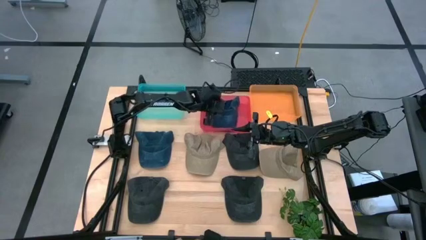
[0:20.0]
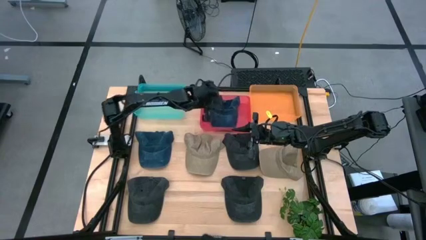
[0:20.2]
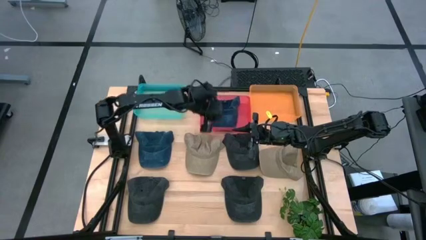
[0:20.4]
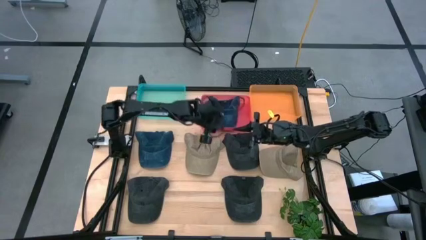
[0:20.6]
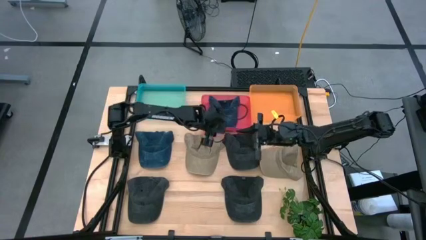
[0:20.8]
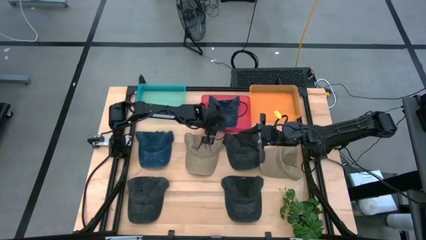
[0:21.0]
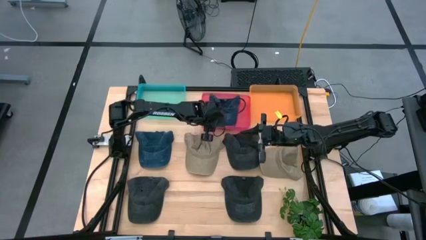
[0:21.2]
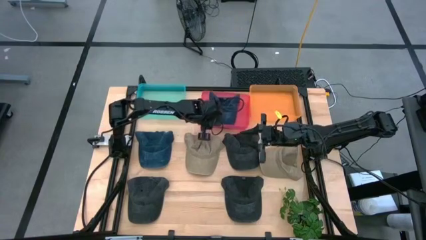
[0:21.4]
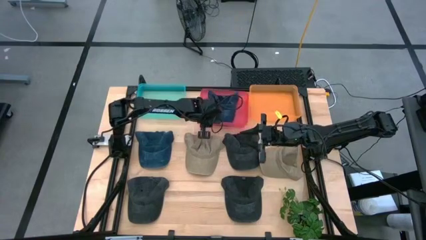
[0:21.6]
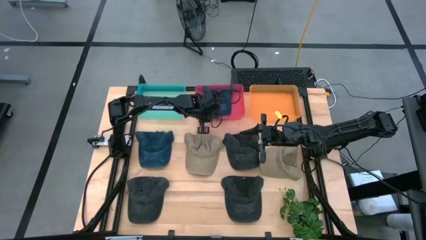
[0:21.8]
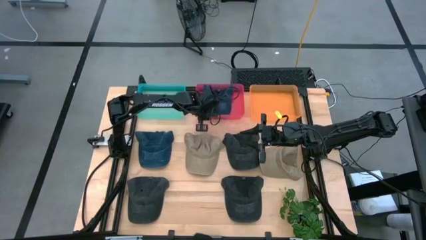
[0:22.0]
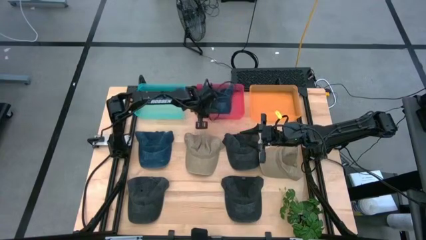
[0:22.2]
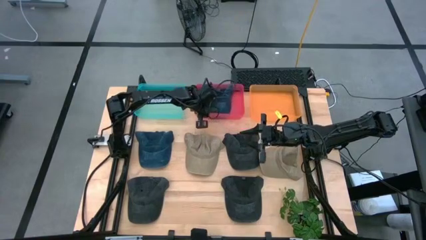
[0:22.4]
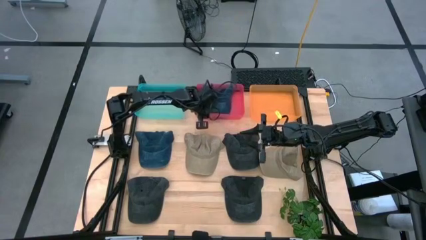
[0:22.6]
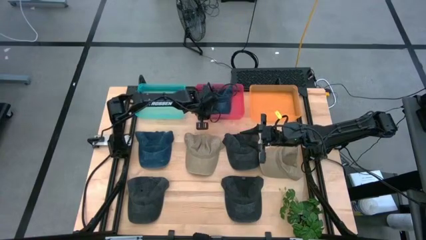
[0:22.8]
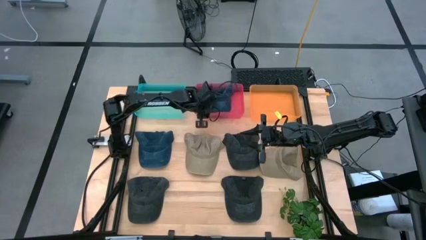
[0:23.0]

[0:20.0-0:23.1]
Task: Pick & Place hat
Adjust the red bin

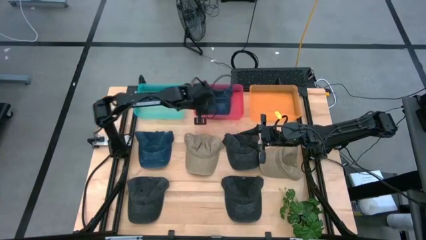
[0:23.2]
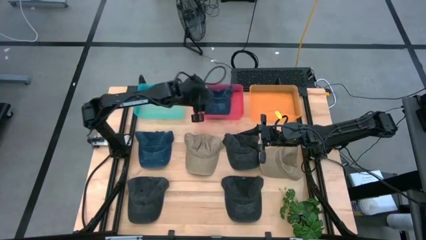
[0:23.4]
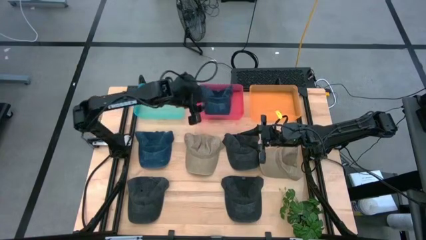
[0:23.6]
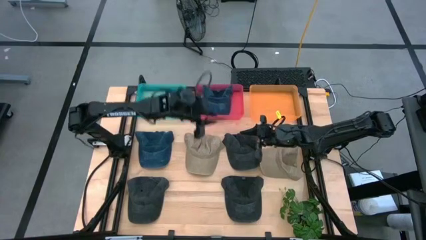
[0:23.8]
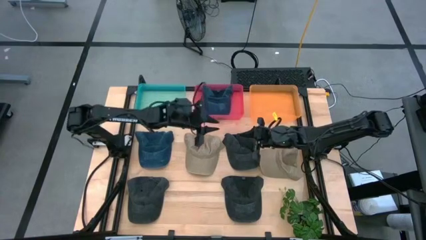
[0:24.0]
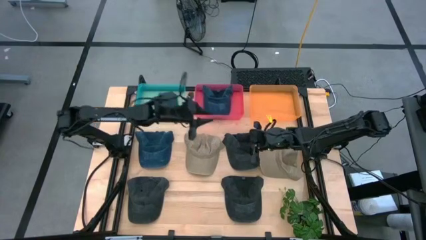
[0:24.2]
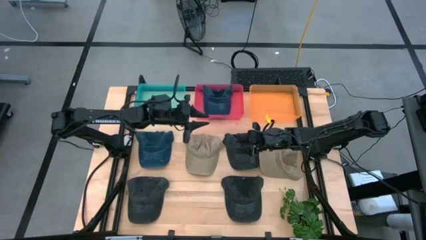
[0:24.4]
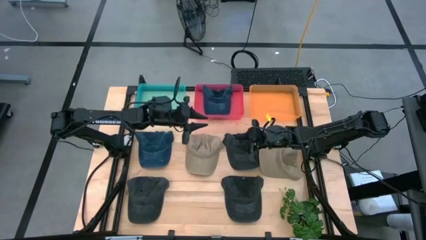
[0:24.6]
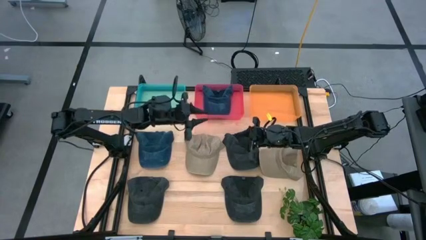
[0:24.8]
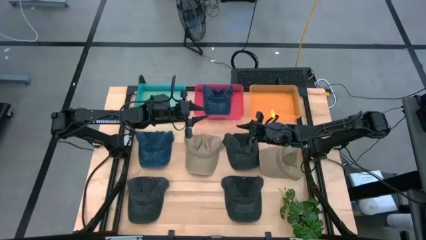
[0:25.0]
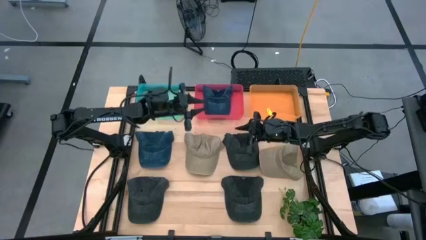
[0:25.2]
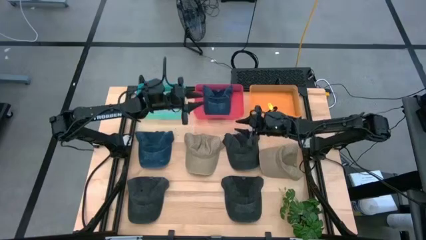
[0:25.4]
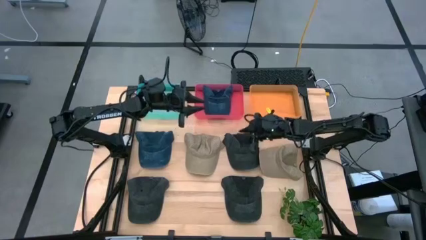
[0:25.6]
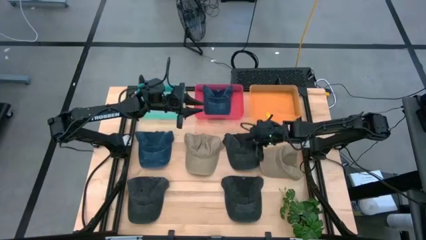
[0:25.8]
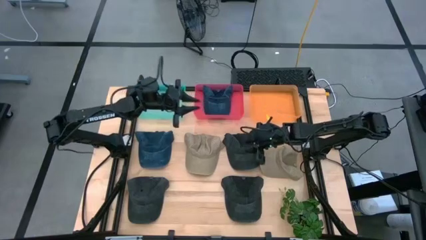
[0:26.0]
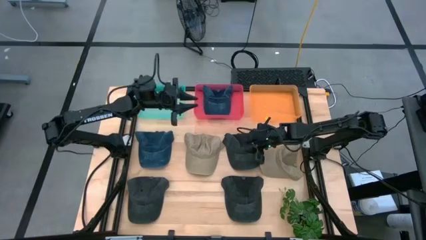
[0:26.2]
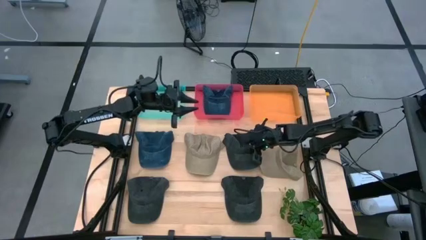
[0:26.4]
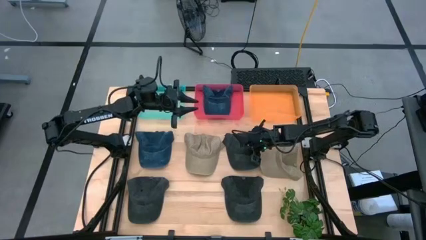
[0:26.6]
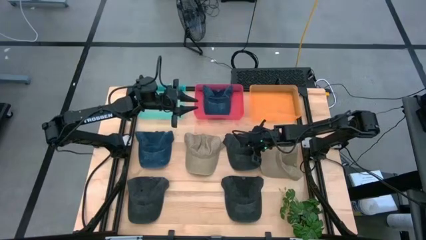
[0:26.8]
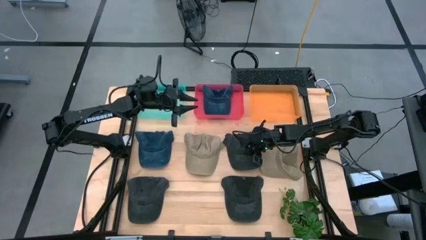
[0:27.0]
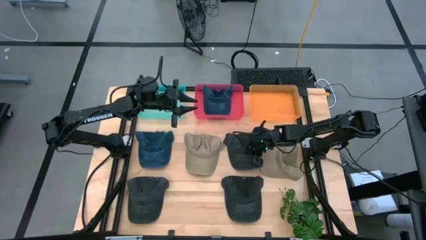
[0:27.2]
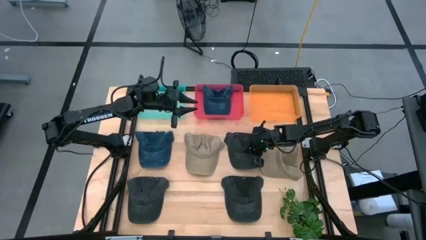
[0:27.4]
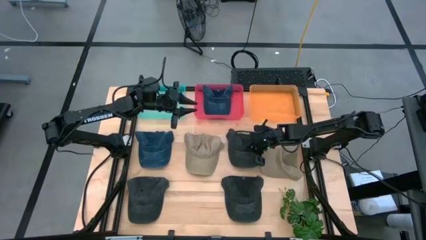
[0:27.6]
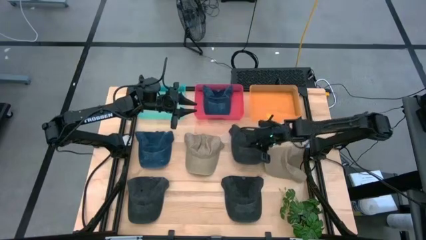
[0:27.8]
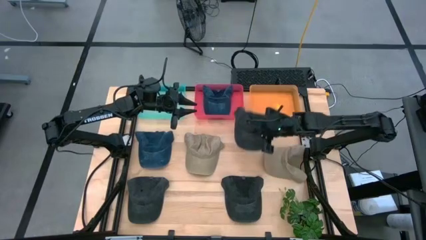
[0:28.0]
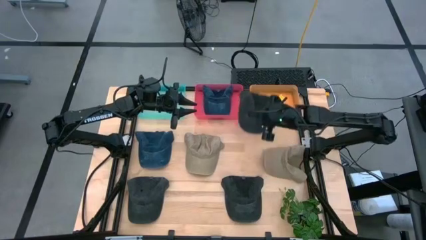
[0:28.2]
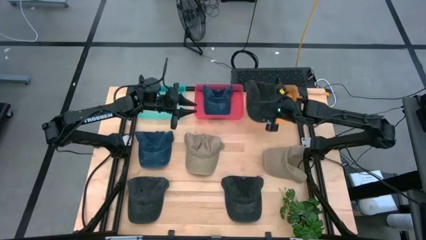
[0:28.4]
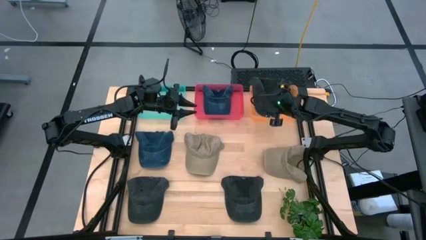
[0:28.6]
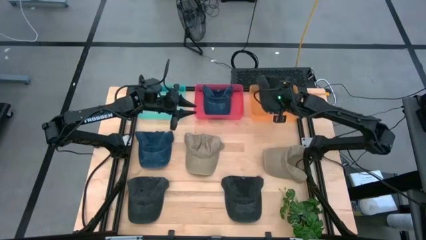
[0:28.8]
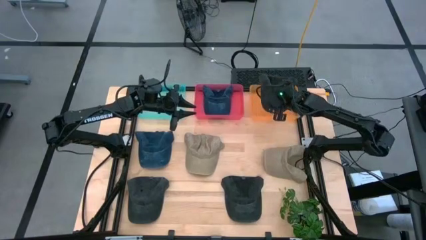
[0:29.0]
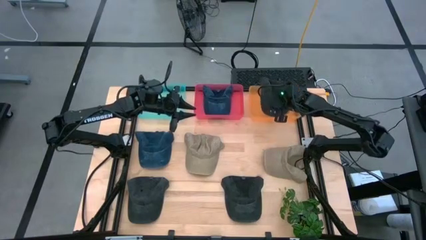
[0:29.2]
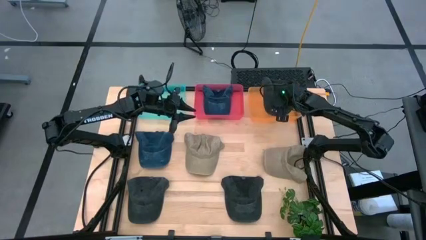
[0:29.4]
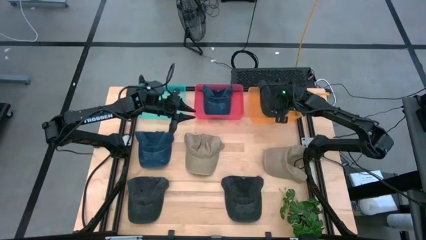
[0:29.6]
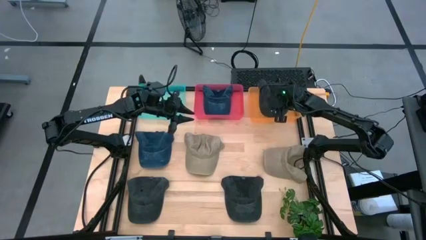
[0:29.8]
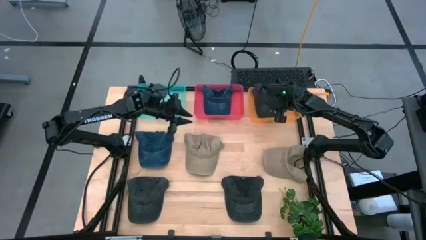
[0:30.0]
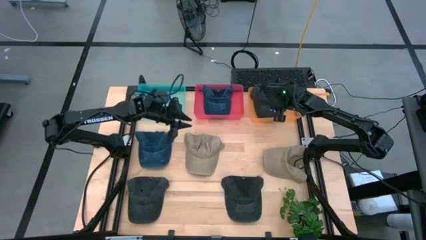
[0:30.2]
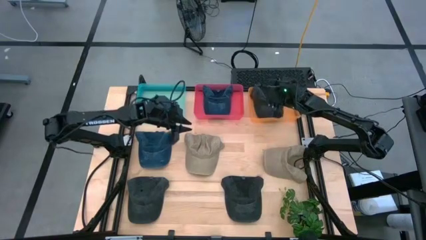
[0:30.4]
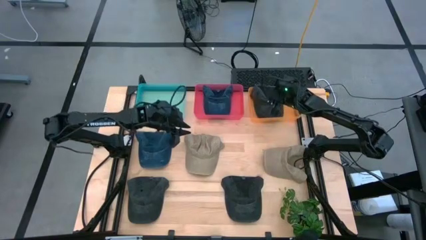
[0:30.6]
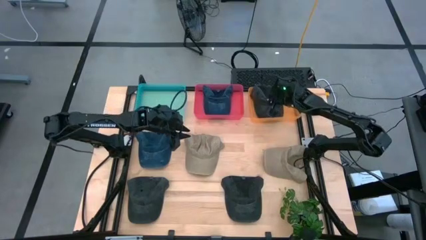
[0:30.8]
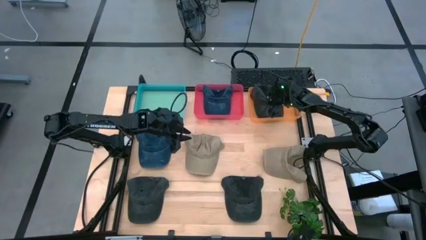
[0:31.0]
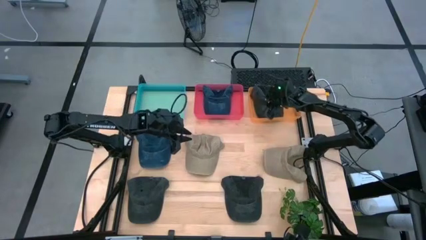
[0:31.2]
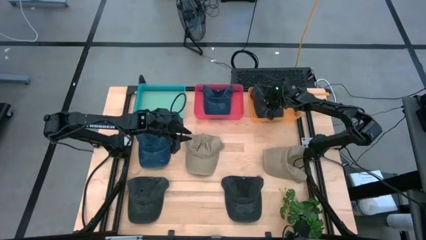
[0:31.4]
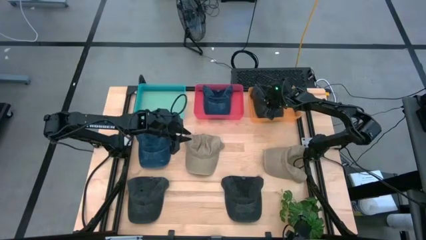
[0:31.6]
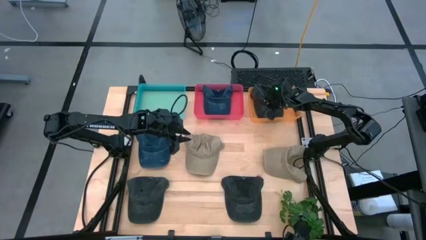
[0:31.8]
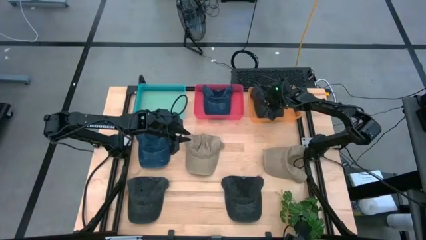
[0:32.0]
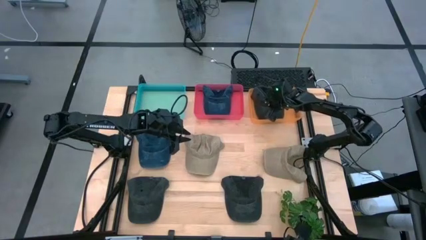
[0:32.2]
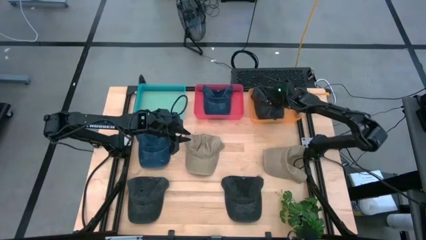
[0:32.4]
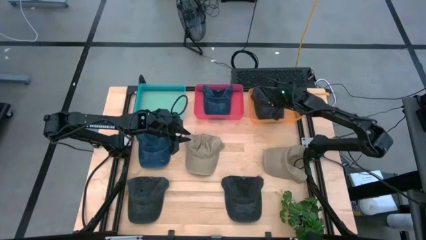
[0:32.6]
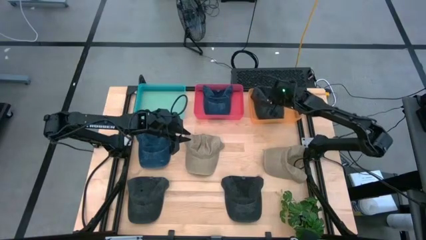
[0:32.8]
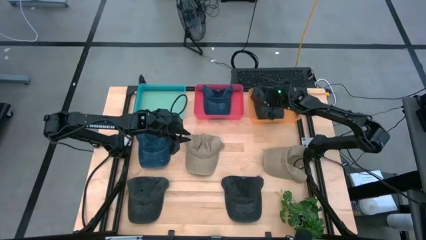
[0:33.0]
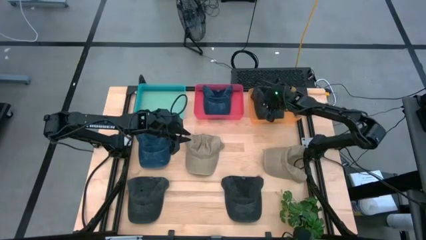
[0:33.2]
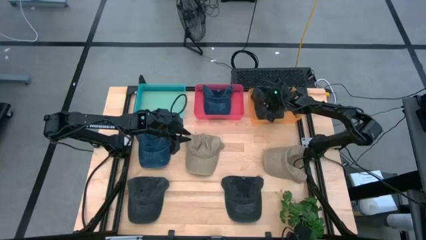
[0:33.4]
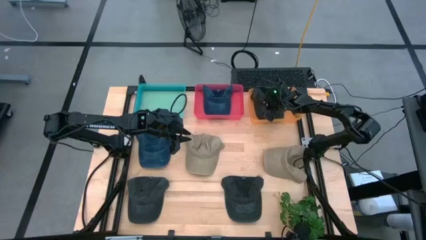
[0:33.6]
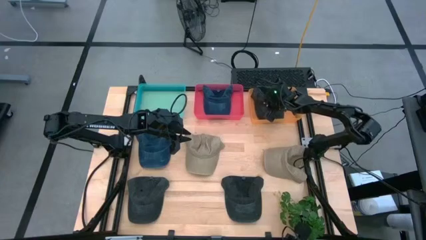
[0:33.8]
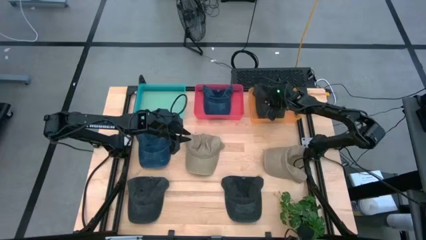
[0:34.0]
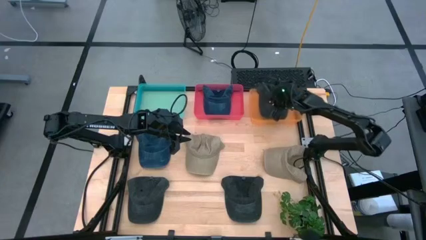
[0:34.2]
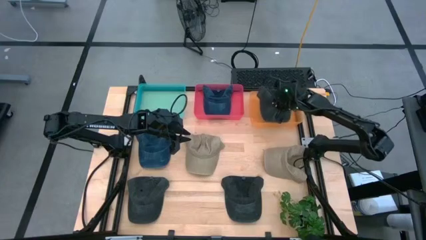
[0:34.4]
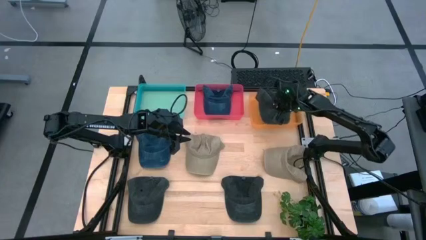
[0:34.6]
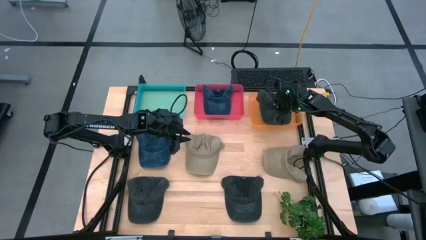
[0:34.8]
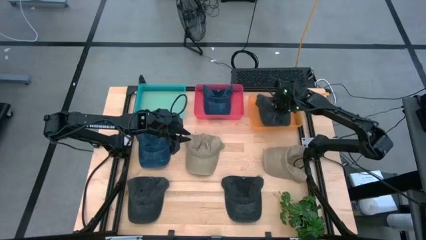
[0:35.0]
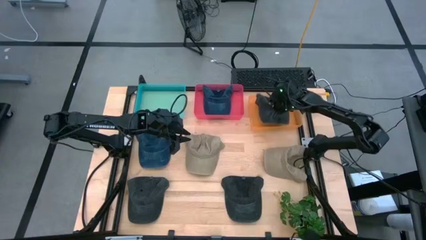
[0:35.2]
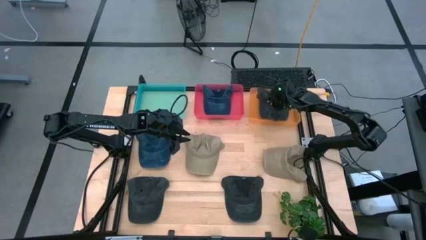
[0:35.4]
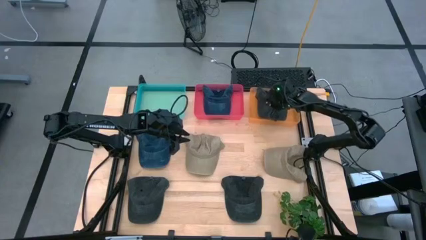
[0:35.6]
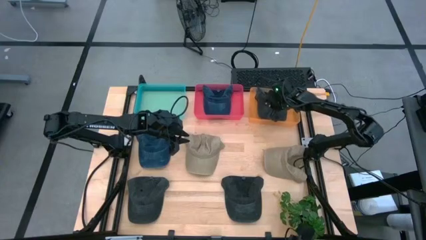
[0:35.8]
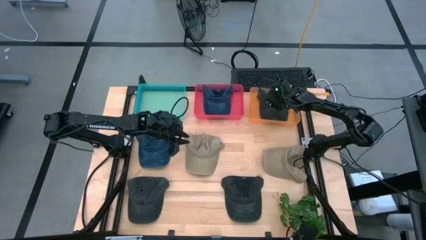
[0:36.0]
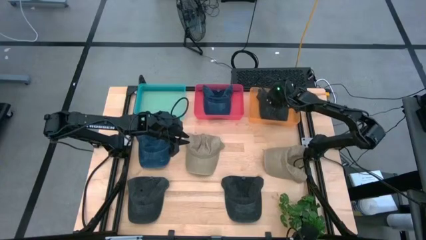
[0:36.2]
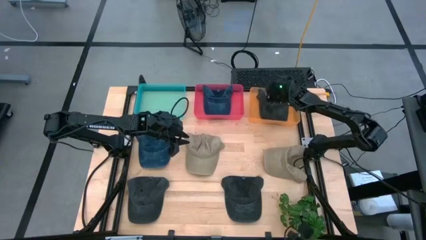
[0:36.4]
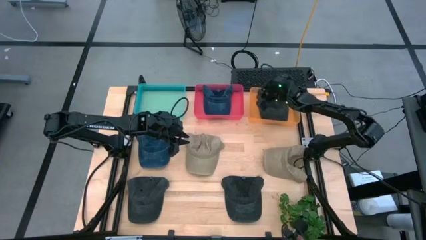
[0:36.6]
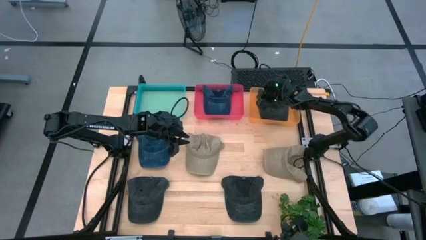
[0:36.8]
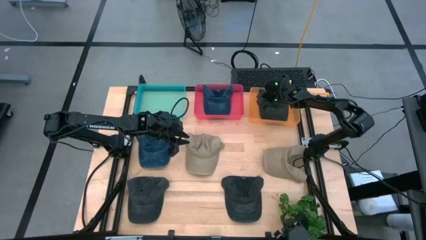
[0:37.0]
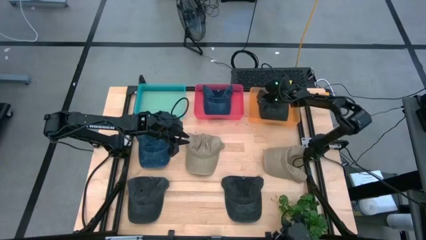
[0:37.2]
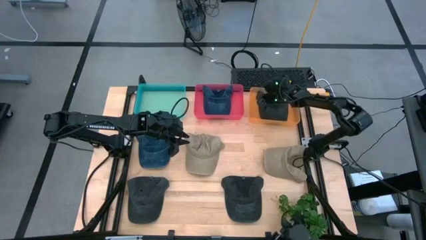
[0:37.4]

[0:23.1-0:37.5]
Put the top right black cap into the orange bin
